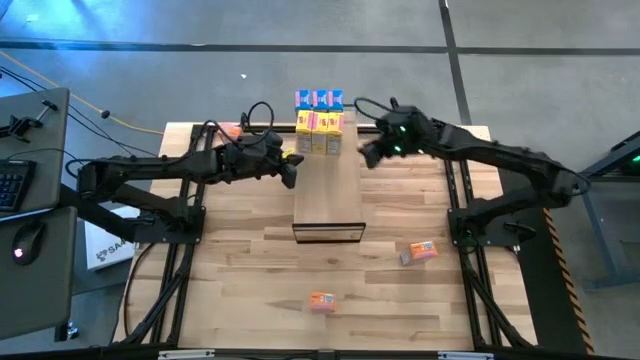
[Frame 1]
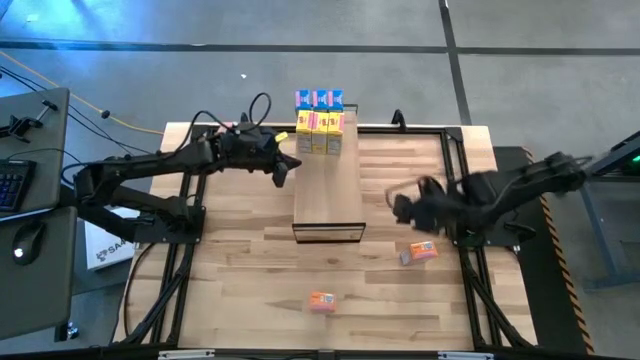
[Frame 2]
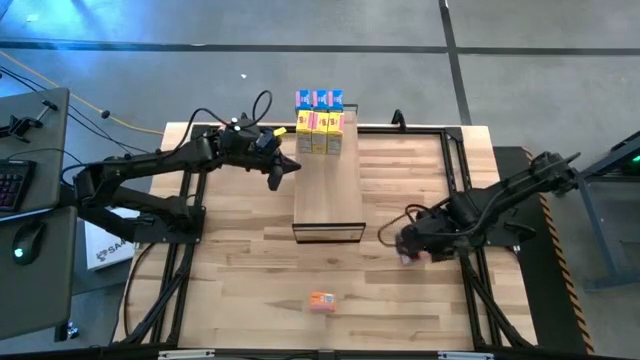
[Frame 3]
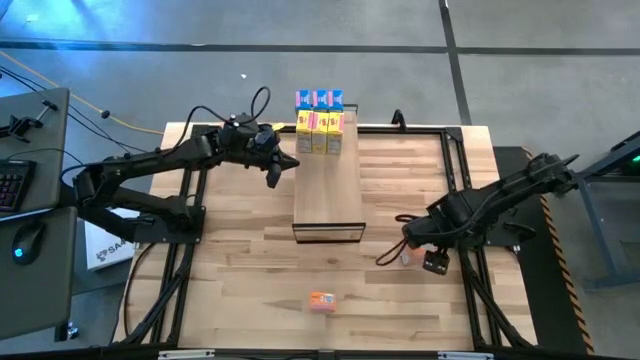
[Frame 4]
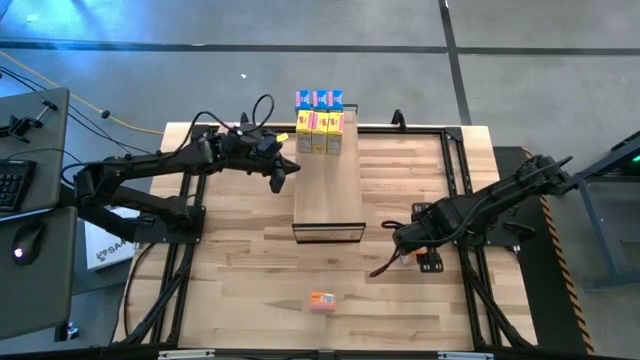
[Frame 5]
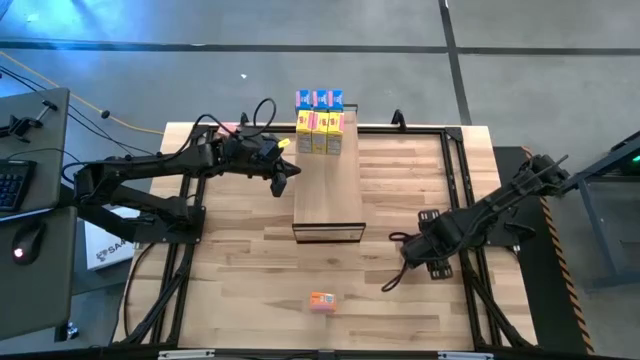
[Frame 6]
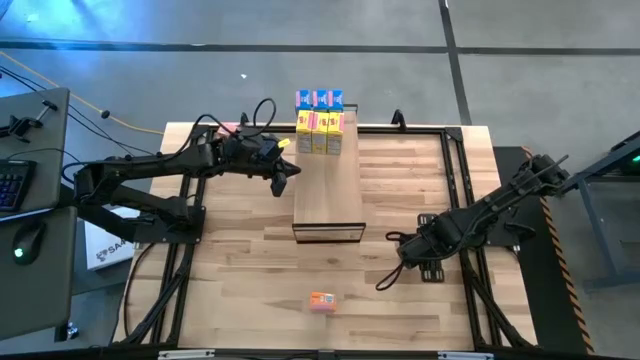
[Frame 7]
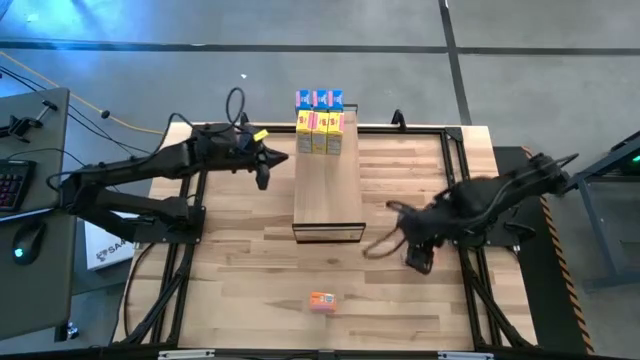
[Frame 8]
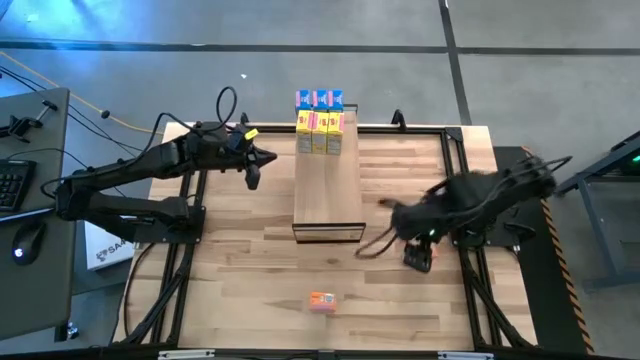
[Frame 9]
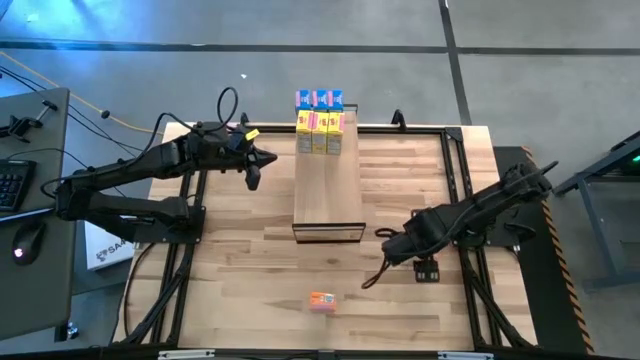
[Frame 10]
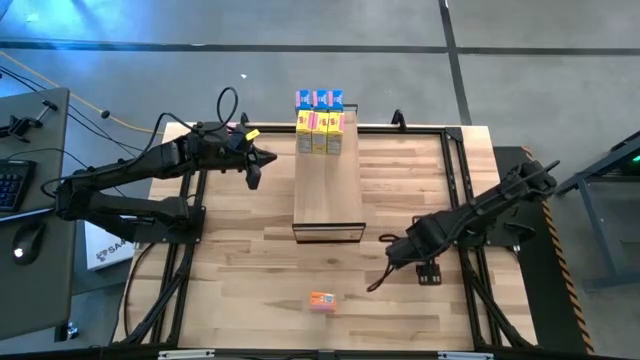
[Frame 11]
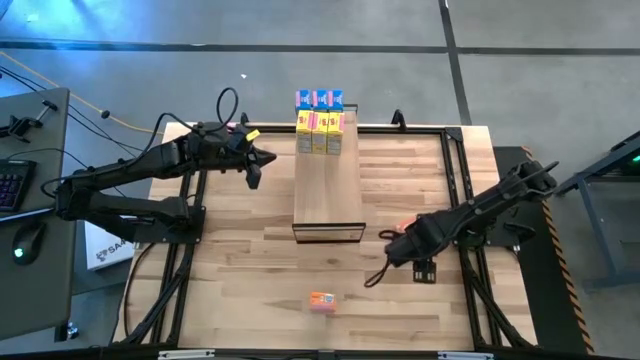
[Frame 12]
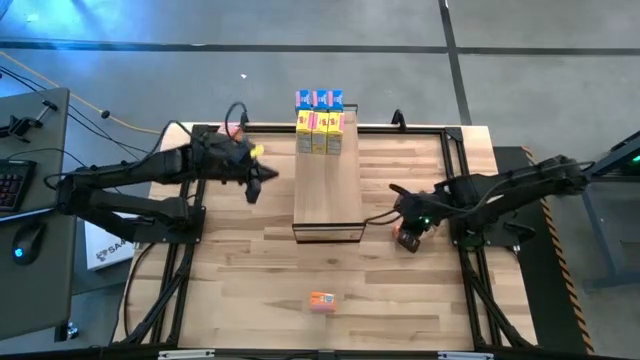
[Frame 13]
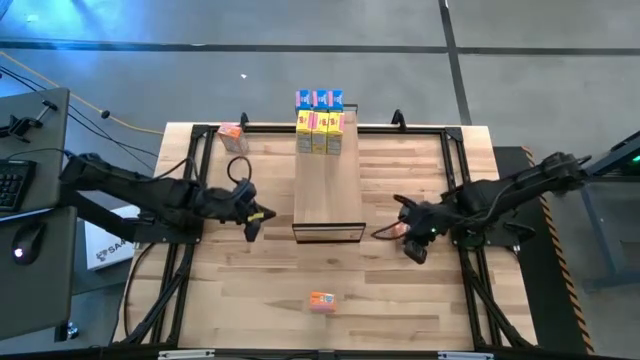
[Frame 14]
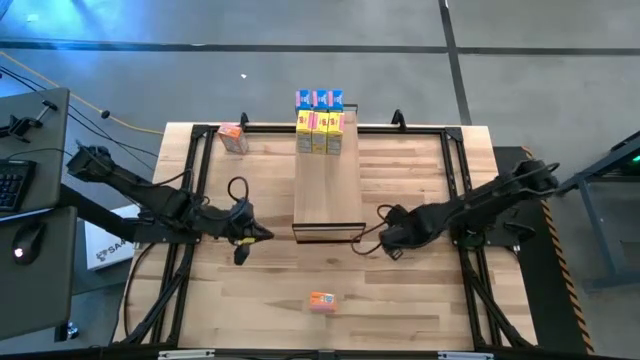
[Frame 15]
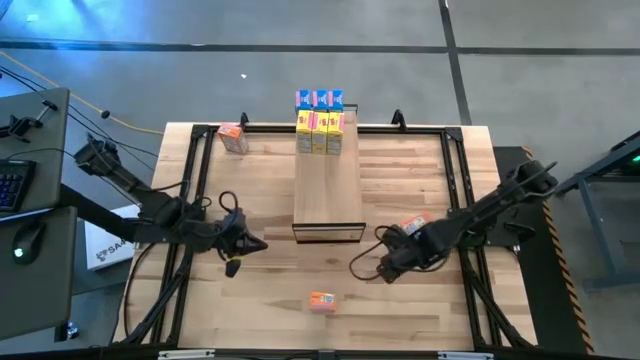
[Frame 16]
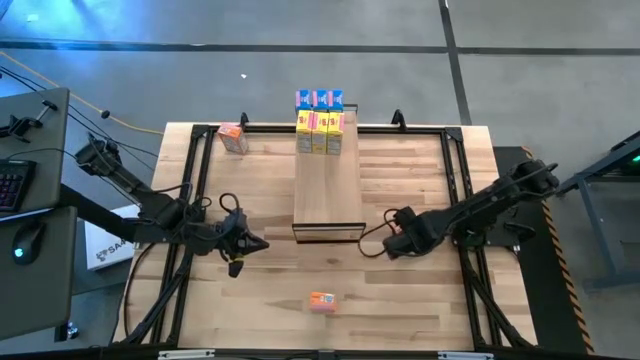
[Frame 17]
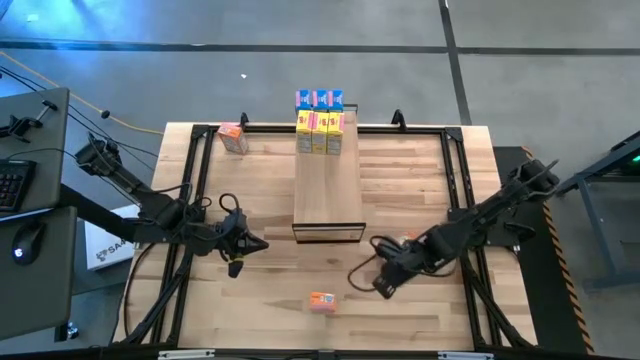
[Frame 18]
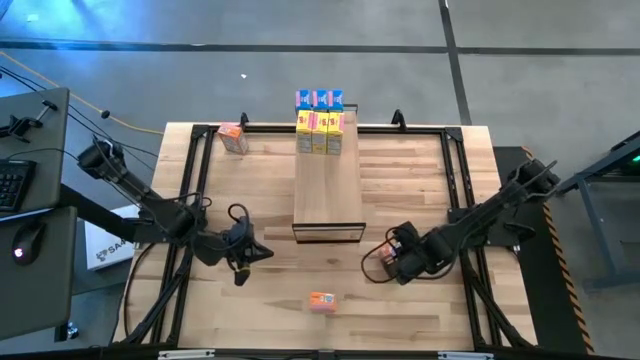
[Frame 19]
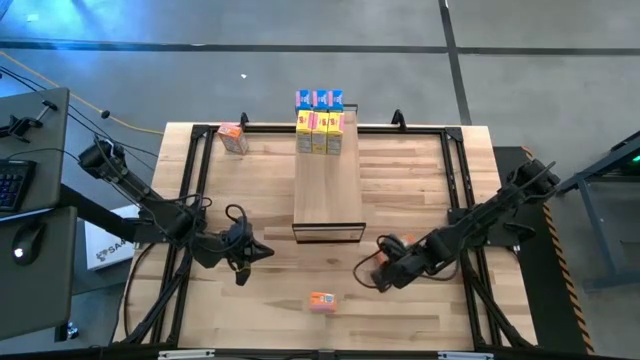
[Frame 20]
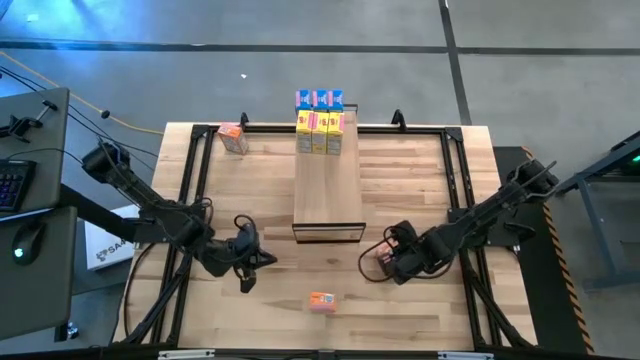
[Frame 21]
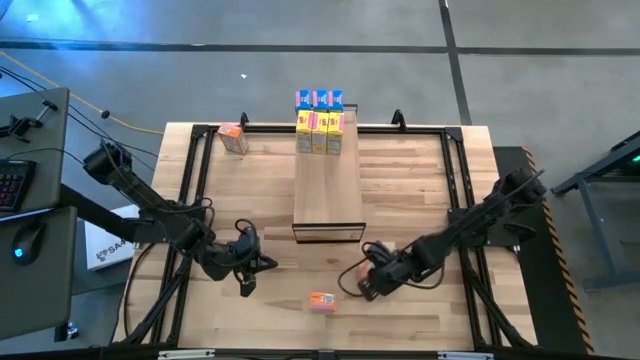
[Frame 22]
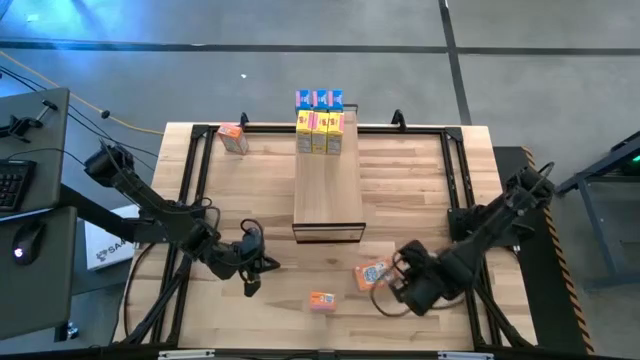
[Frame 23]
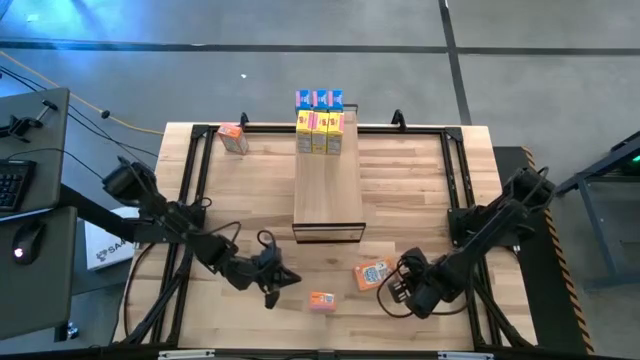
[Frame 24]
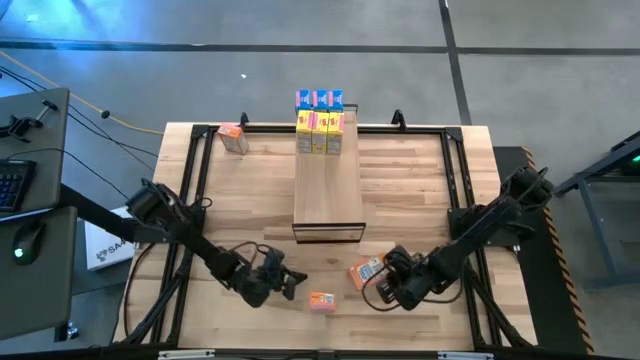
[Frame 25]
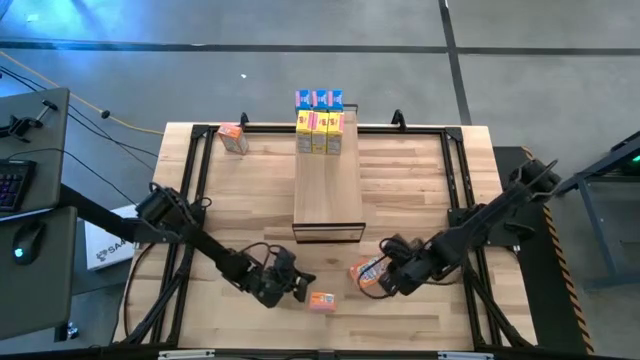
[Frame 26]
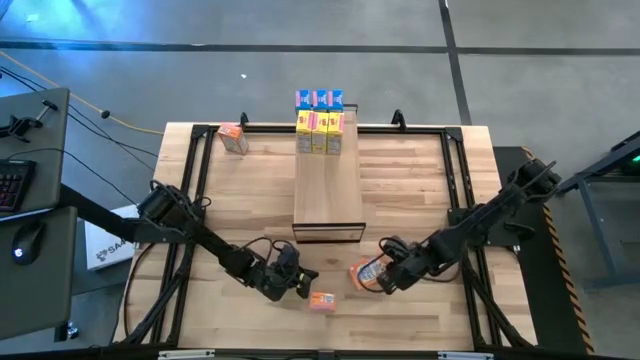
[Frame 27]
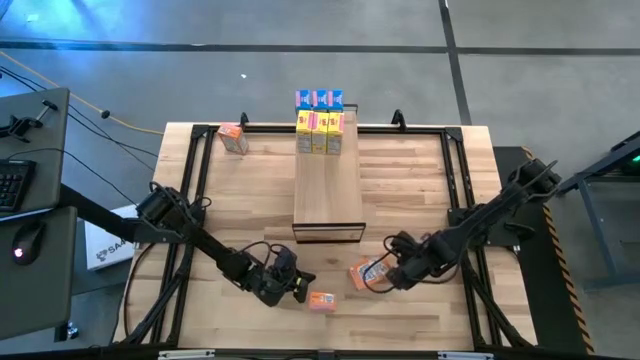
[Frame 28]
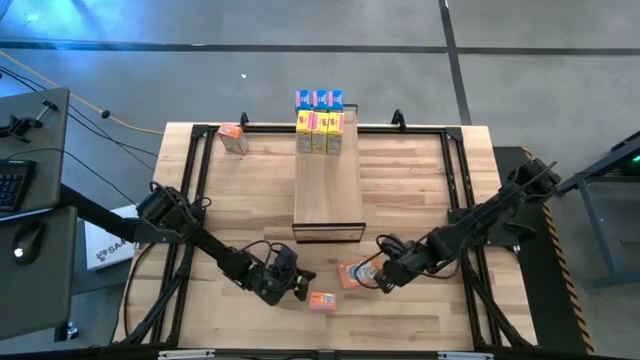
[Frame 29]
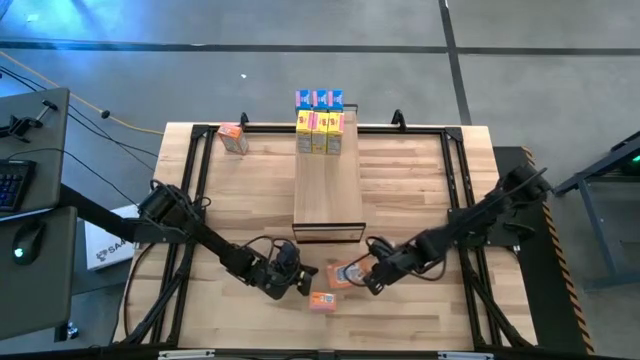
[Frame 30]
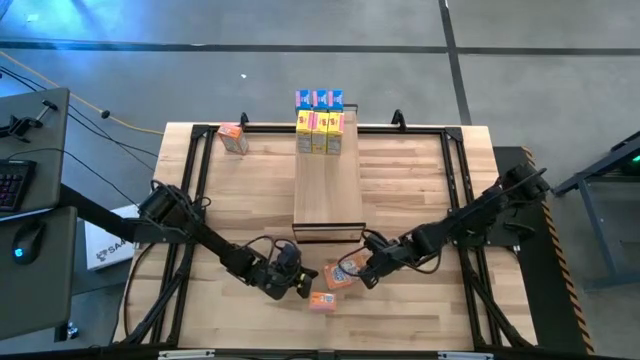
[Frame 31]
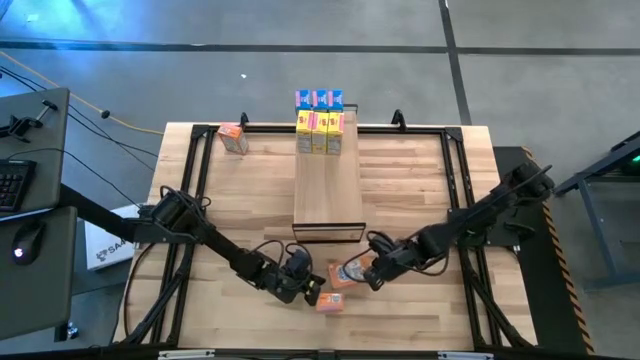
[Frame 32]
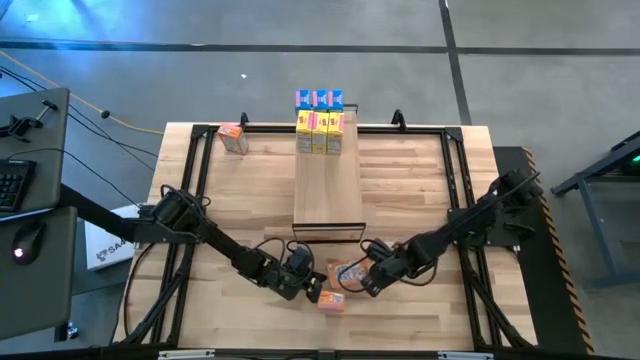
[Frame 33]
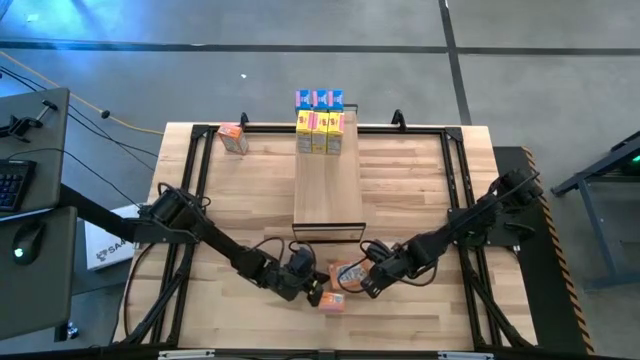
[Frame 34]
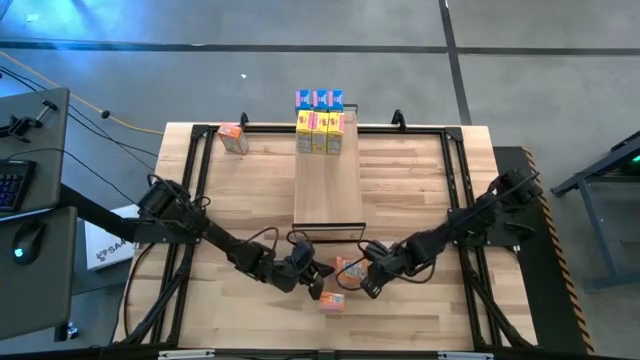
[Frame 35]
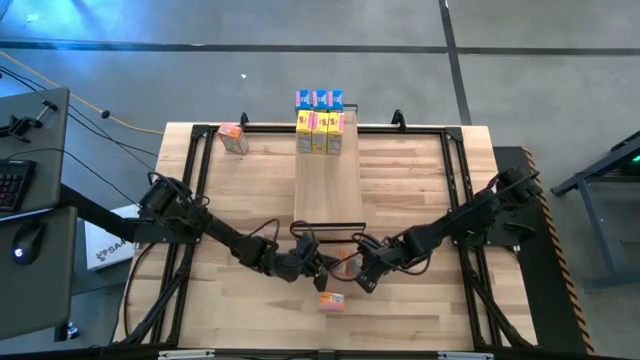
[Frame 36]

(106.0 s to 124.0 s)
Task: Stack cereal on shelf
Put the bottom right orange cereal box on the shelf

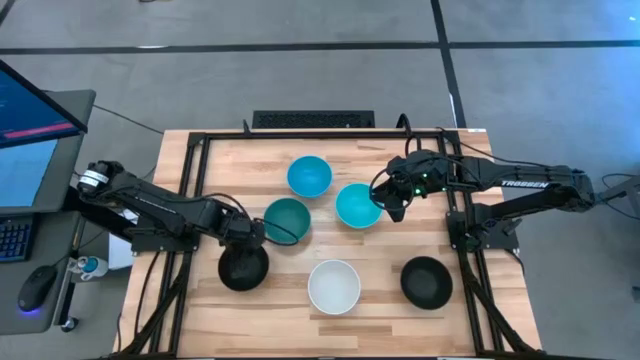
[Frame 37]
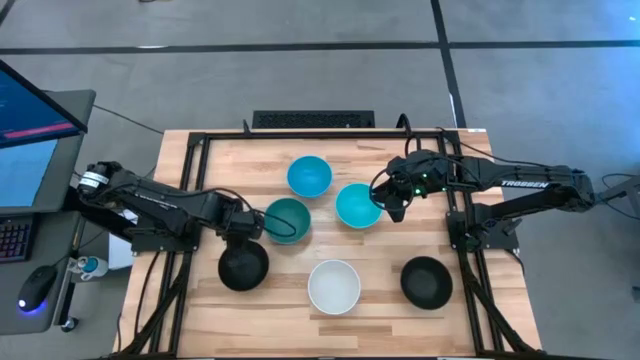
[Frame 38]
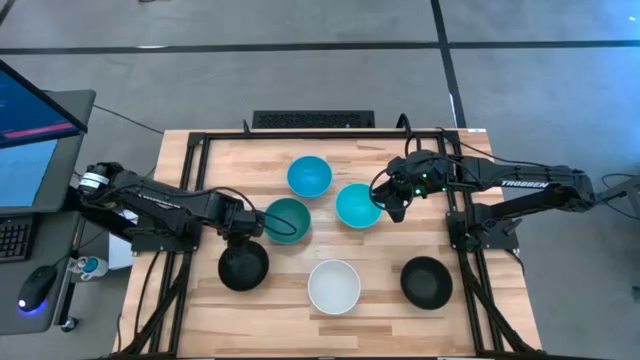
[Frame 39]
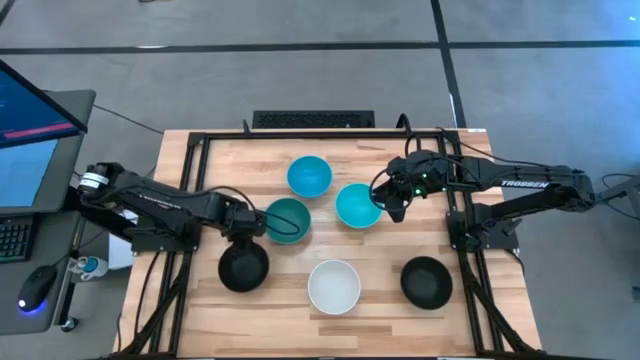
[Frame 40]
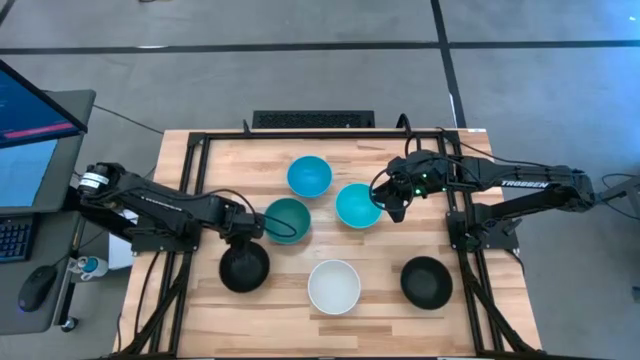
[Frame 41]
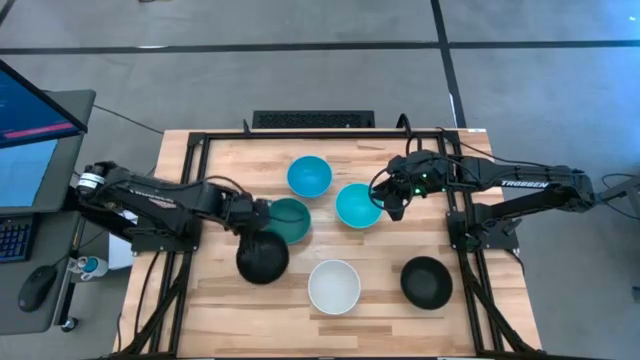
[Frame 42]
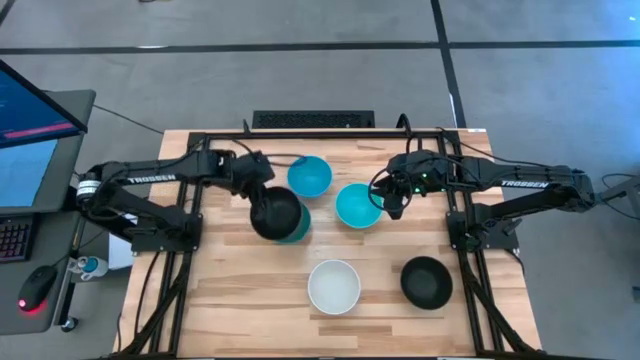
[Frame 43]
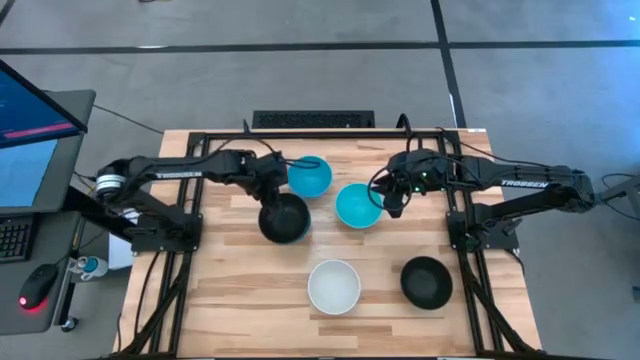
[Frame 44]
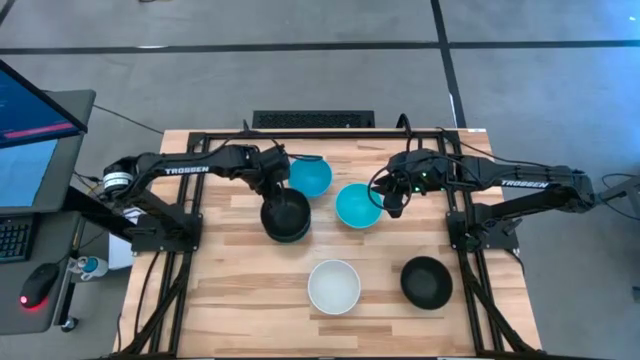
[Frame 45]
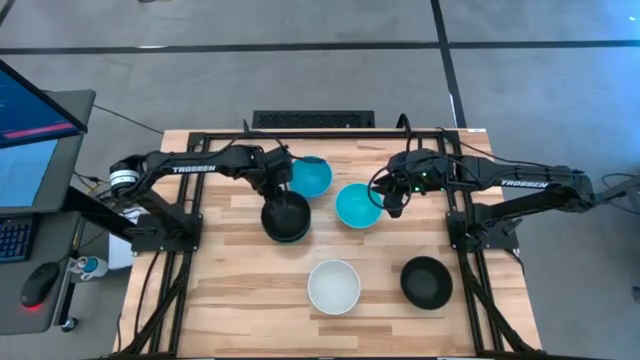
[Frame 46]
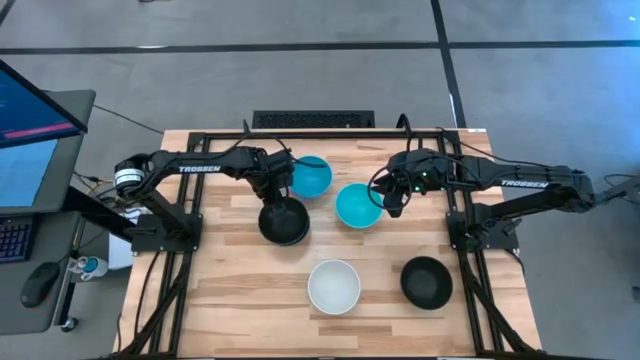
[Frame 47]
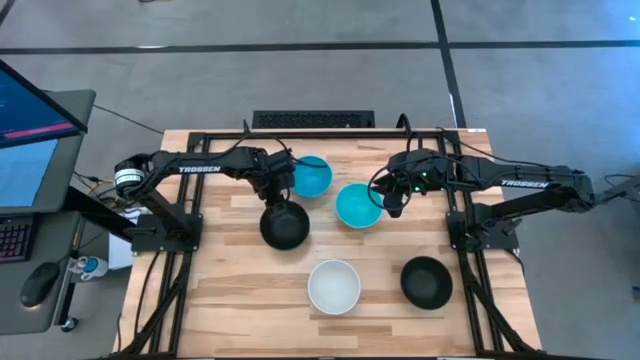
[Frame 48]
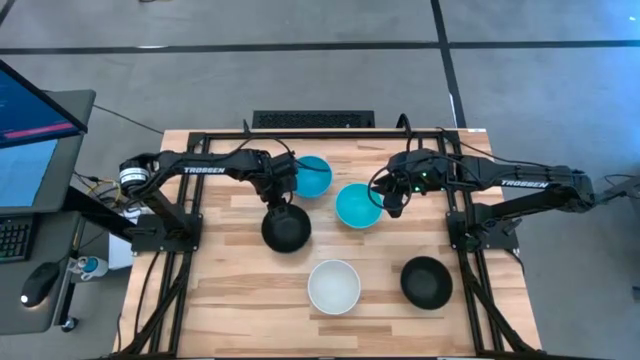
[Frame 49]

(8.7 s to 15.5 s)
Task: Nest bowls inside each other
Stack the left black bowl on the green bowl
